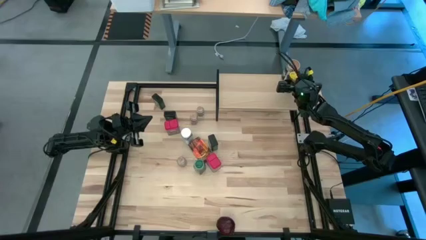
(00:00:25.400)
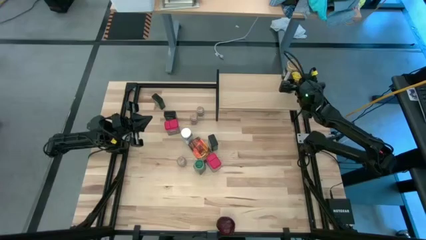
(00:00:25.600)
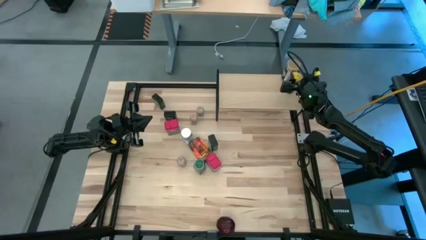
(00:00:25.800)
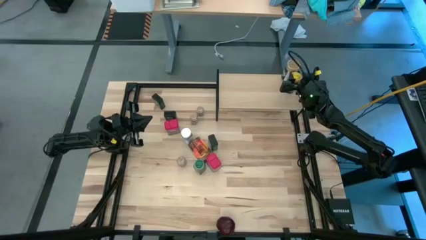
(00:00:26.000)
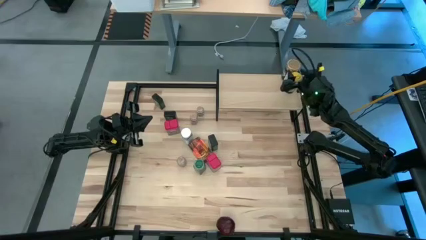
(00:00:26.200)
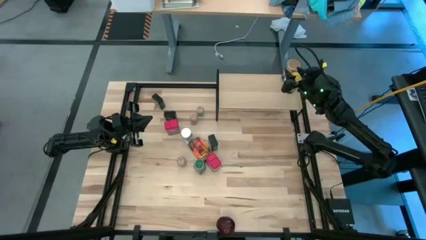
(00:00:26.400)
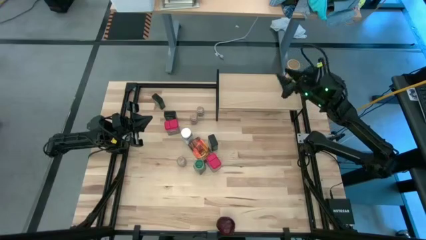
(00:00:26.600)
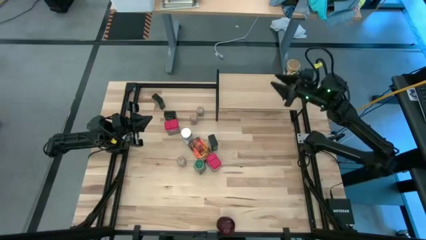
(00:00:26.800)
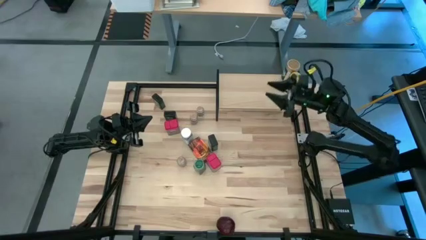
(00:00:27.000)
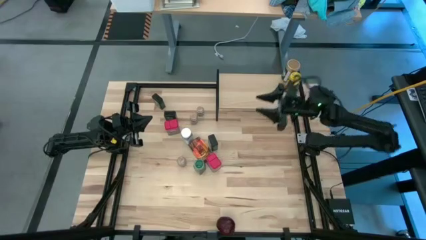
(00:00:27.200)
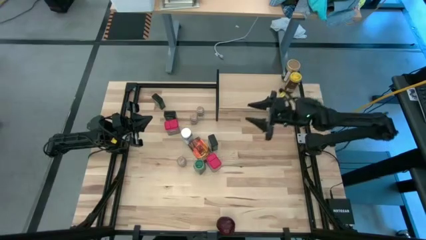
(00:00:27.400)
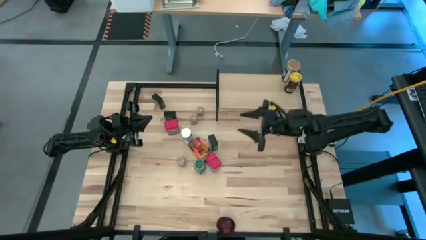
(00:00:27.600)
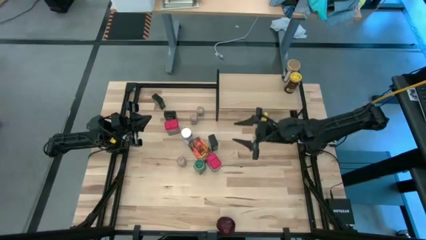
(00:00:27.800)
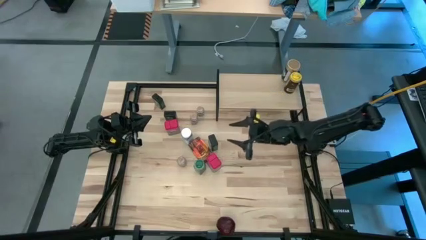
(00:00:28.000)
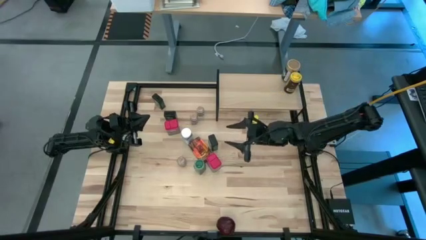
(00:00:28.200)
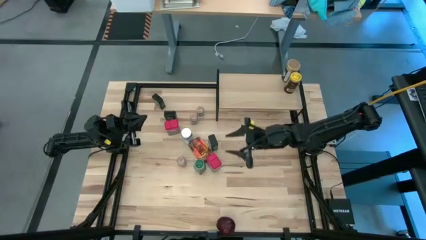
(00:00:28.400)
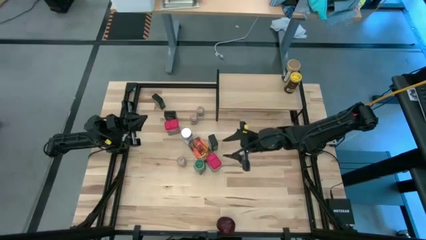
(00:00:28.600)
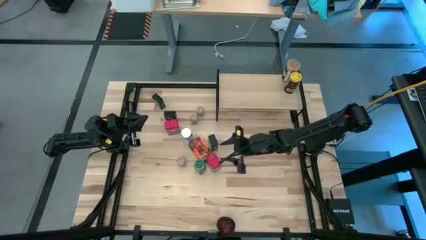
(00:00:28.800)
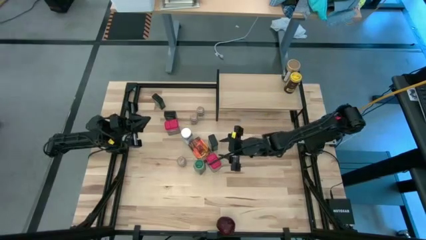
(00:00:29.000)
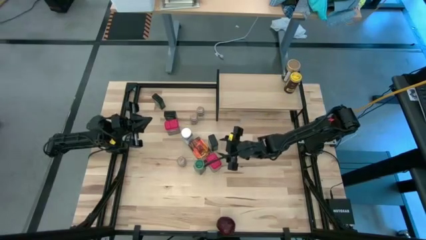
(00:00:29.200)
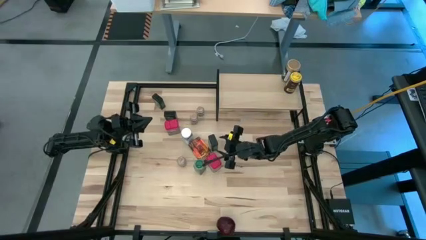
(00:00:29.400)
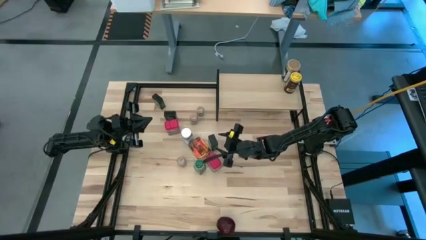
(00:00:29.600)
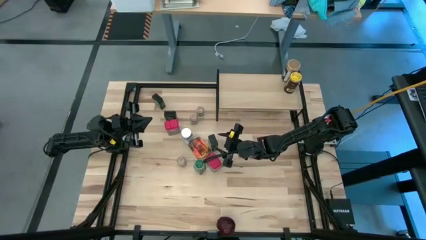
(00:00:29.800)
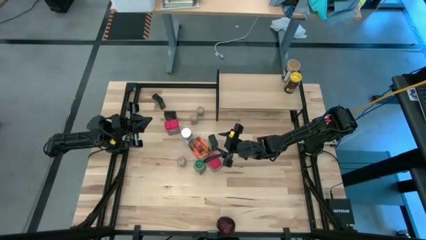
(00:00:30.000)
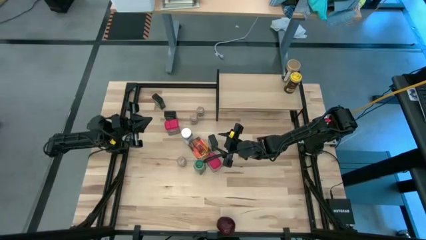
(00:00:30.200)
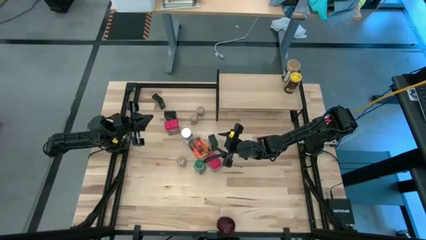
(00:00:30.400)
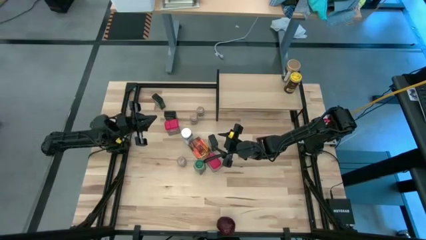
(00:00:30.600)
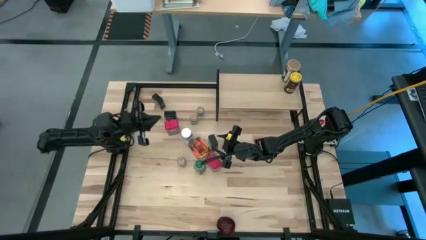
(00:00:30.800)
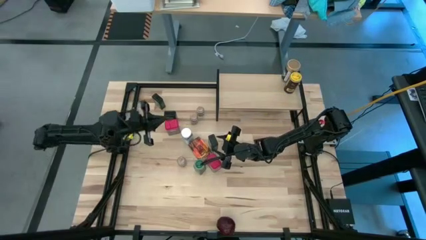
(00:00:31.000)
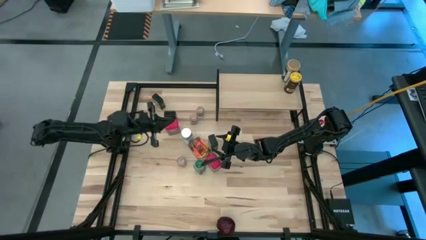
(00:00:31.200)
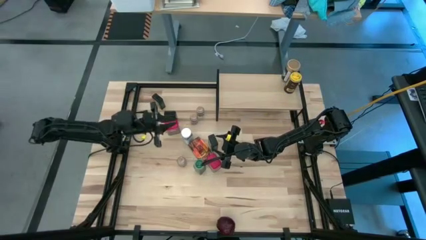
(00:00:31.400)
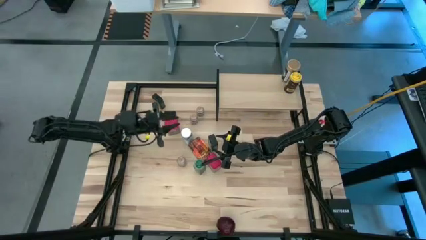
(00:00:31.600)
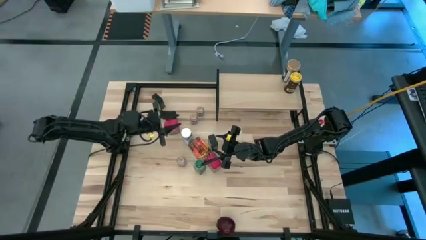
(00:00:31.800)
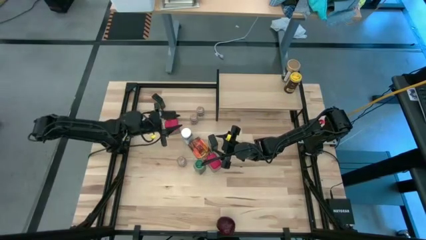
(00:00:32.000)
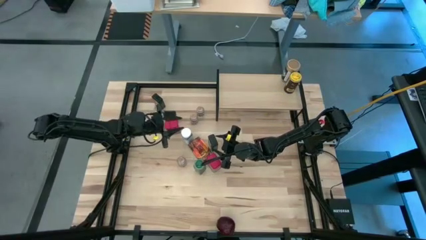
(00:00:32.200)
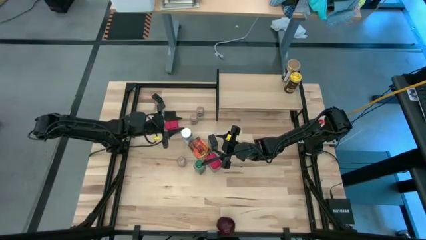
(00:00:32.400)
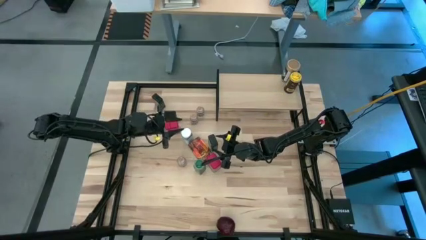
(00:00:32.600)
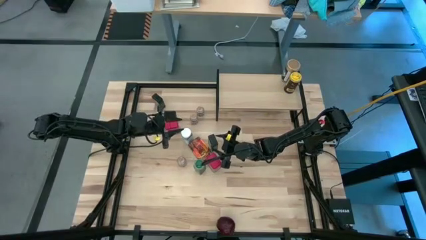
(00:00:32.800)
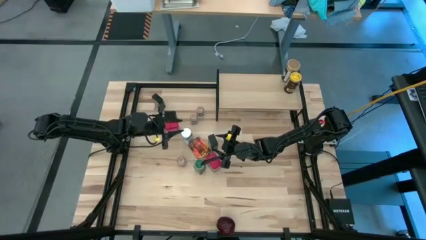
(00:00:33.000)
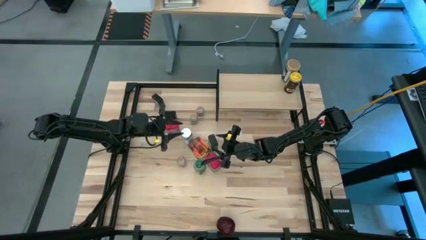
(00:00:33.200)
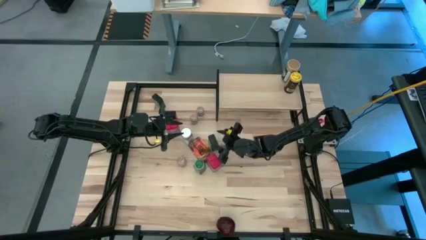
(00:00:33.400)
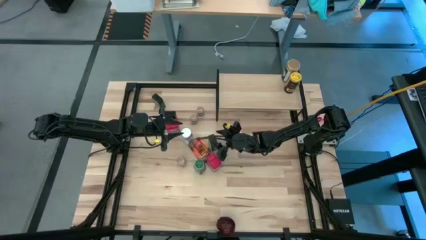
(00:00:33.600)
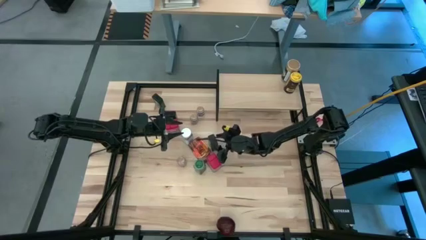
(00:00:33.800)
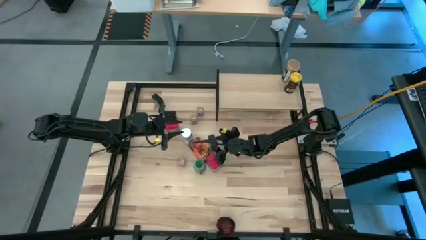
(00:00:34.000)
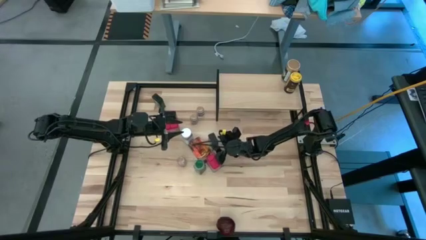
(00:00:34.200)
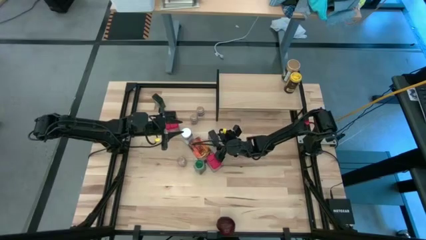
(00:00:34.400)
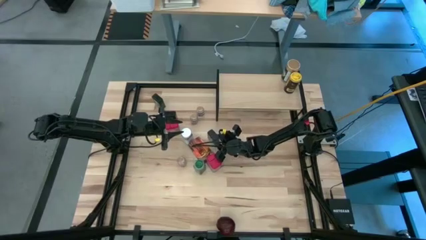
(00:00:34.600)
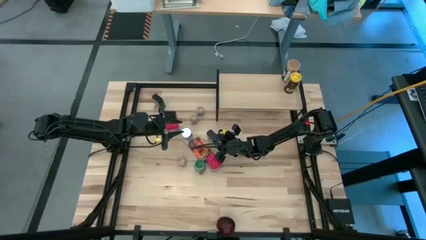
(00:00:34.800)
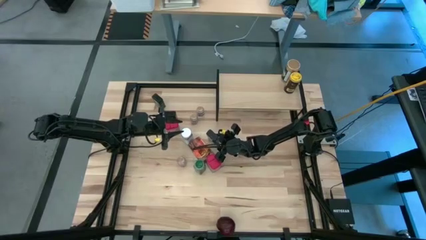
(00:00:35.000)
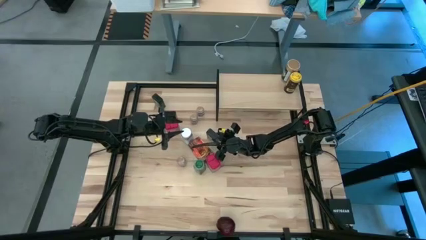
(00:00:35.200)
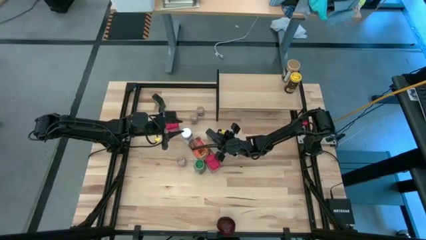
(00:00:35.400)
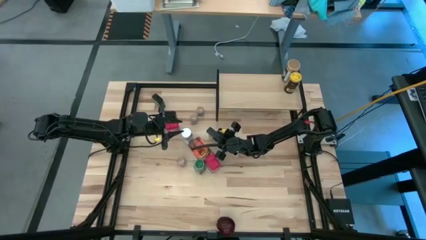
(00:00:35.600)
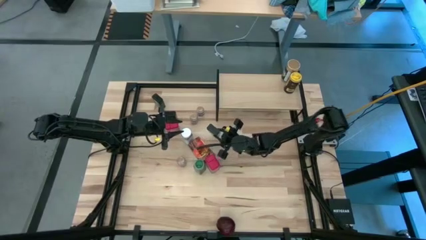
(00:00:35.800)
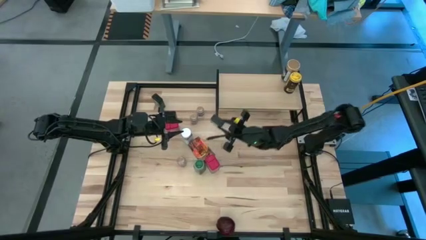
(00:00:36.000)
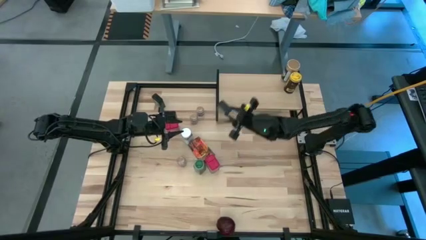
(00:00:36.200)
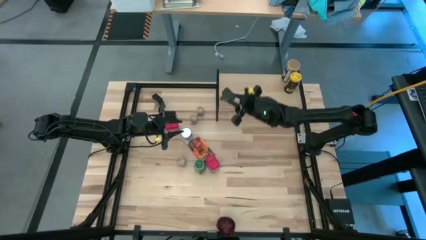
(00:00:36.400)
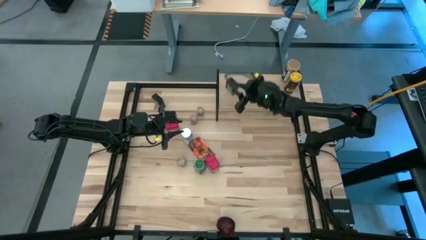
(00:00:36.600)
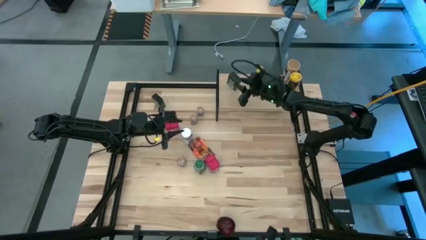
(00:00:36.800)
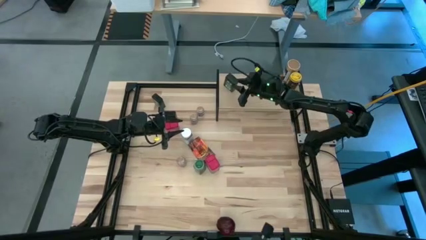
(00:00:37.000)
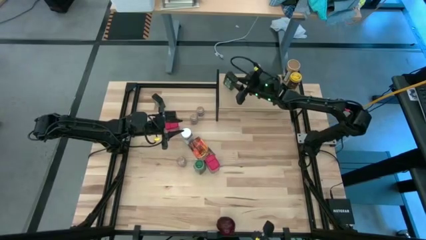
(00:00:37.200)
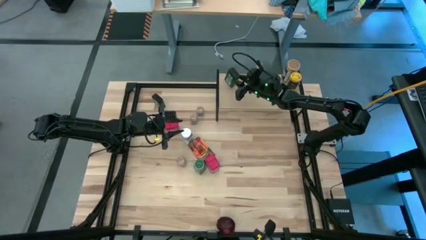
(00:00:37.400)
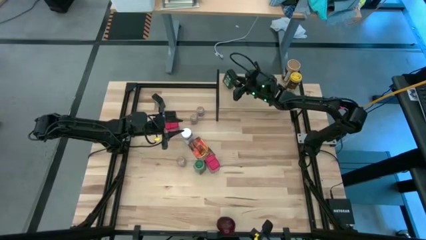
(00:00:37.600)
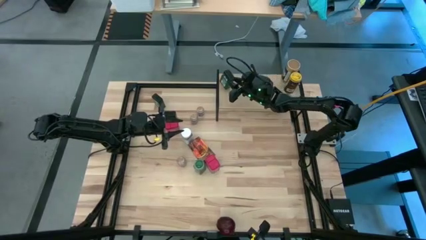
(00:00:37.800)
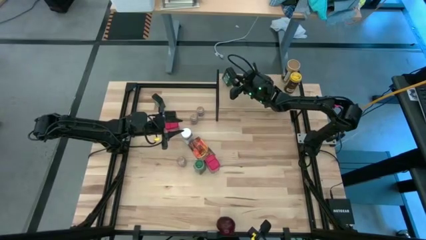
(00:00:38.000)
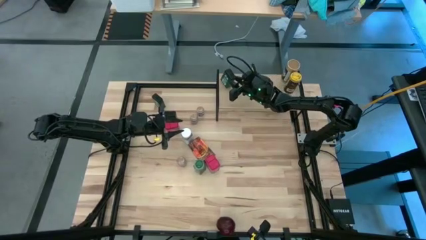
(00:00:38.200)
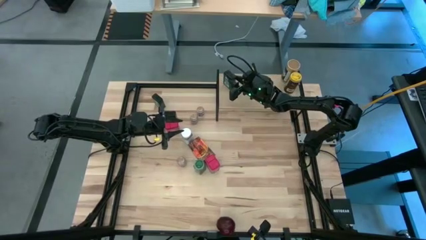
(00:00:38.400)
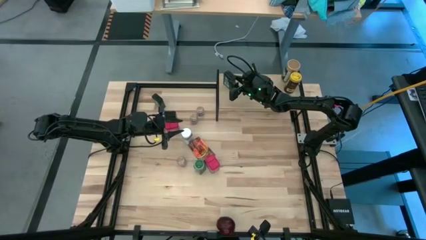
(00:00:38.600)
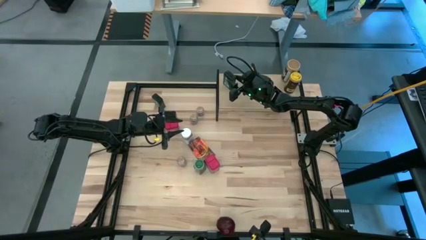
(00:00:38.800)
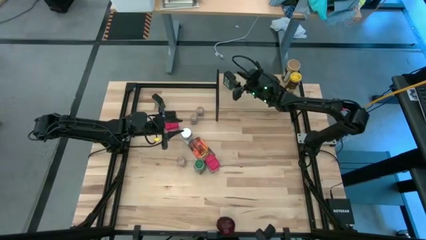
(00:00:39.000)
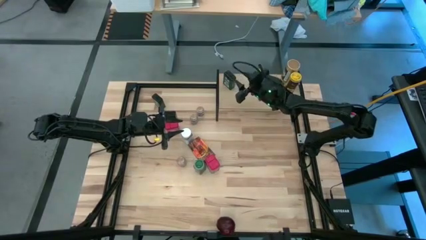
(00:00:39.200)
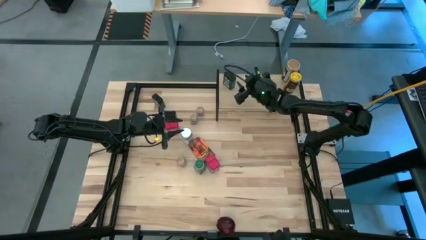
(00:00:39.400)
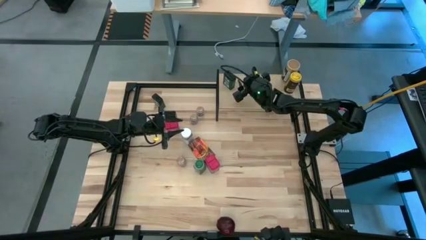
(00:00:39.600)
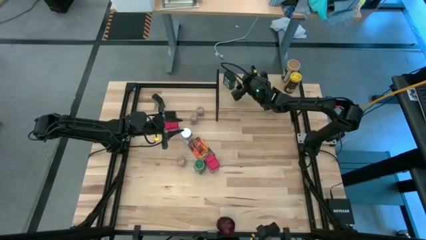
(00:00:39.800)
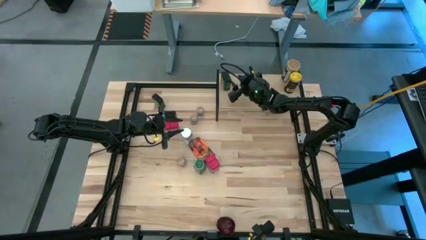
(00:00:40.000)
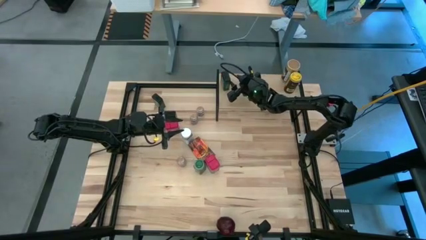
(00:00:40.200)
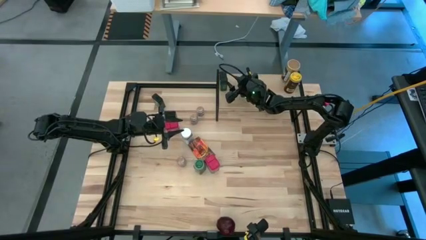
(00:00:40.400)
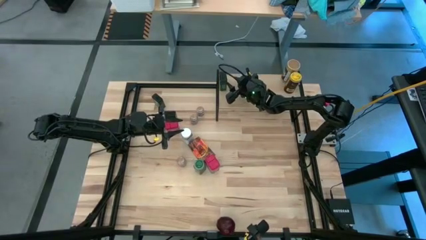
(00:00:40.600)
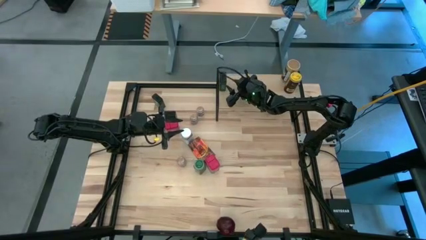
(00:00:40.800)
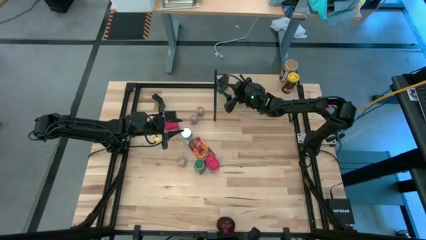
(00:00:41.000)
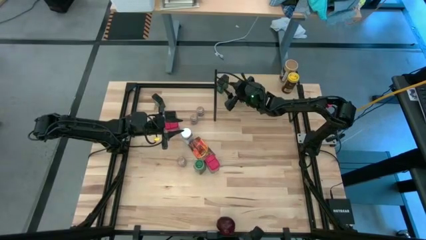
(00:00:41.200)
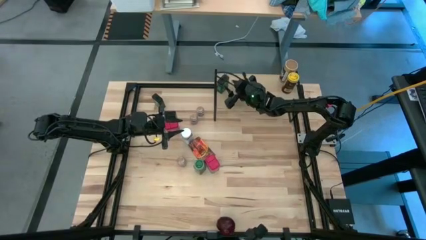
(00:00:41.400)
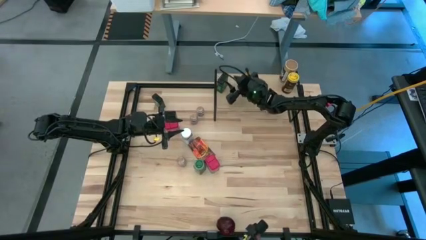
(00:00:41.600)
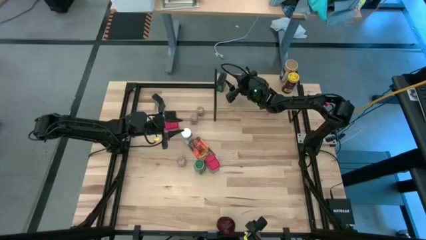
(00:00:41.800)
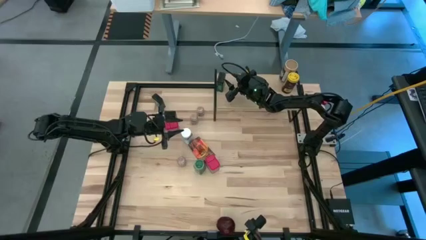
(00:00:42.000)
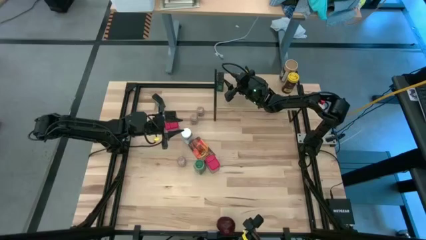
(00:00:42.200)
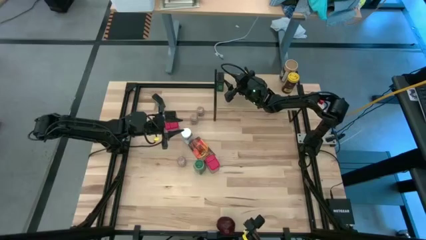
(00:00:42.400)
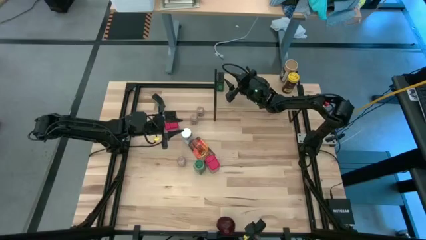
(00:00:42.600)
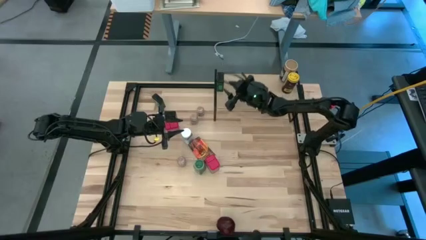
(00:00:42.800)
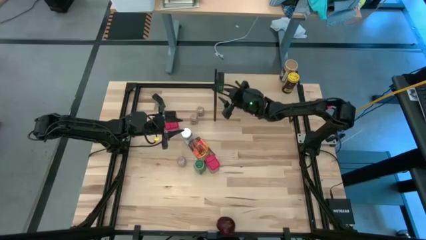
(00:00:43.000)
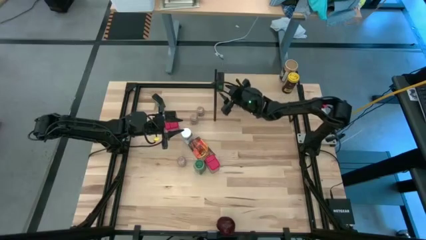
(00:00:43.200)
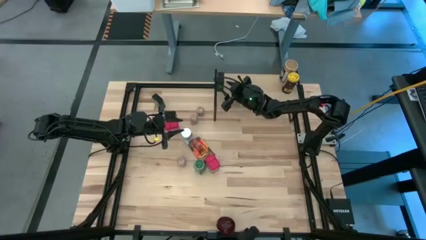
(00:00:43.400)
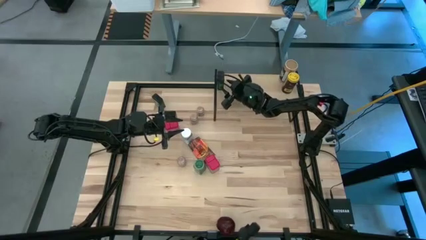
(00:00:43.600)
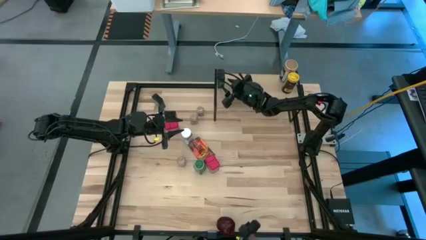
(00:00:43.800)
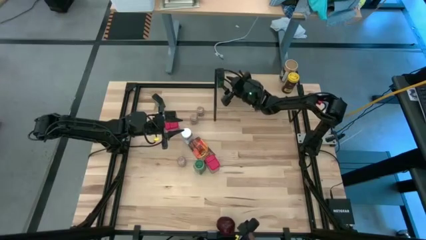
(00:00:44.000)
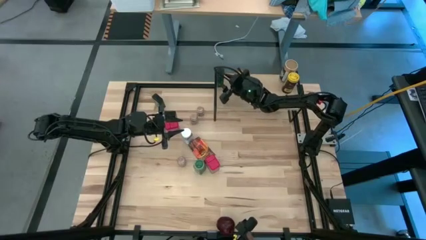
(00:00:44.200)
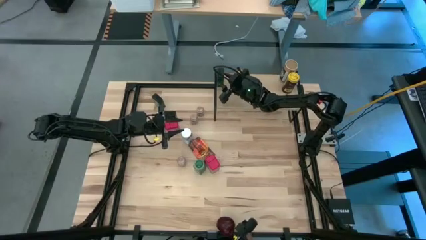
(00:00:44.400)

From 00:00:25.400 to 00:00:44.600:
Task: Shelf spices
Put the bottom right green seasoning can on the shelf
